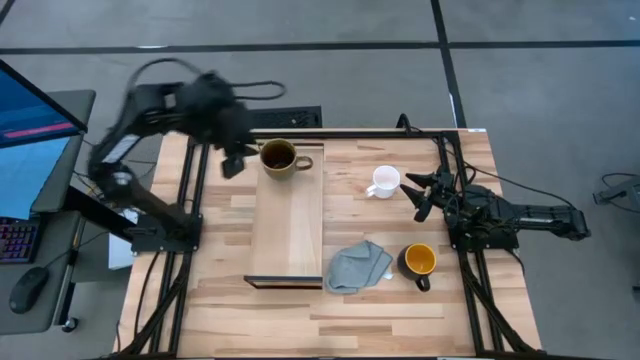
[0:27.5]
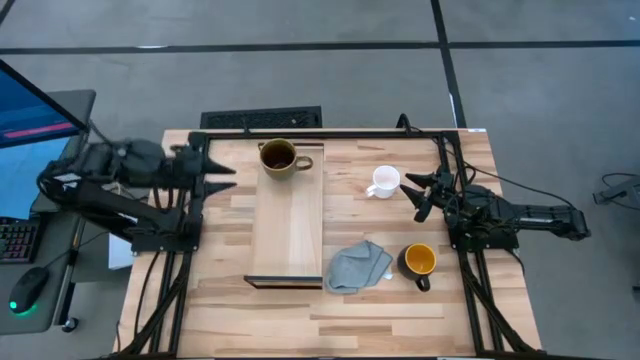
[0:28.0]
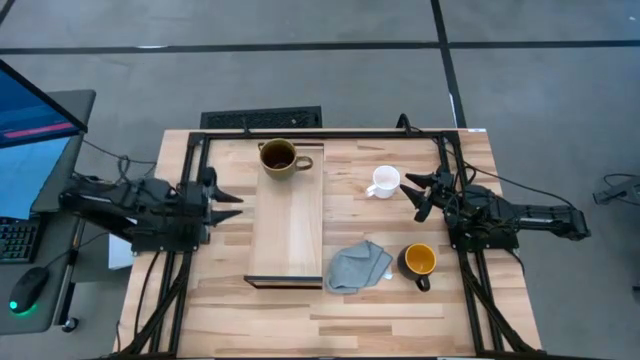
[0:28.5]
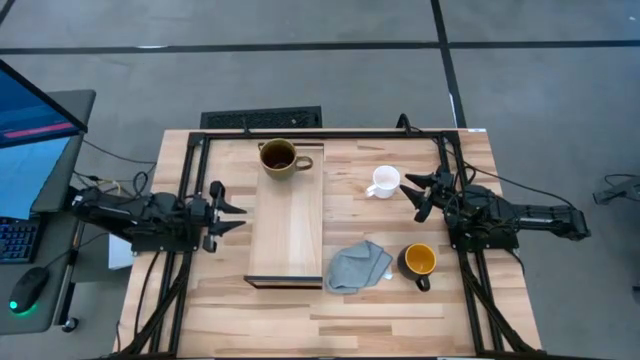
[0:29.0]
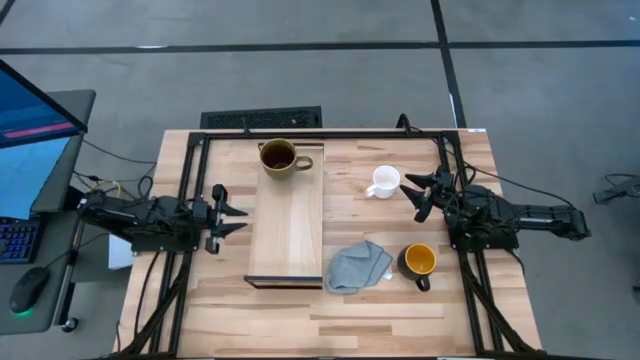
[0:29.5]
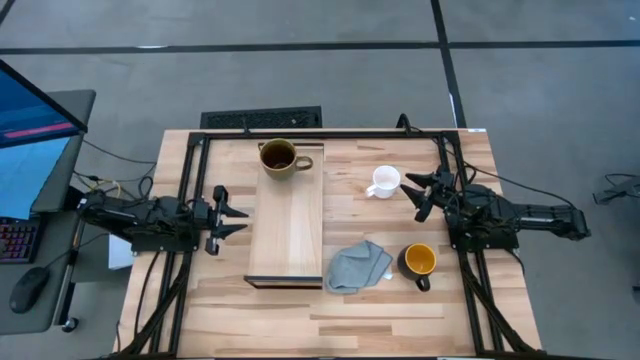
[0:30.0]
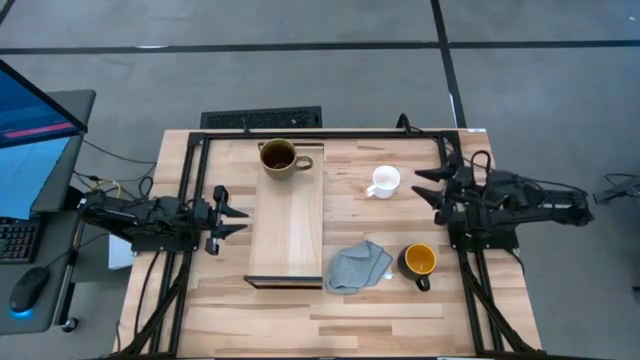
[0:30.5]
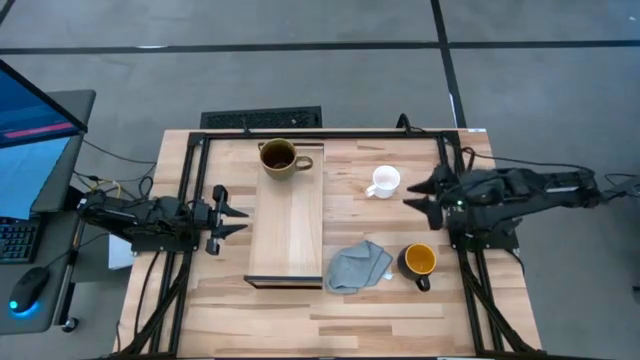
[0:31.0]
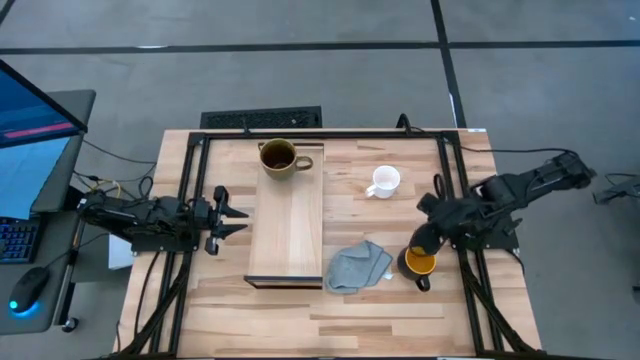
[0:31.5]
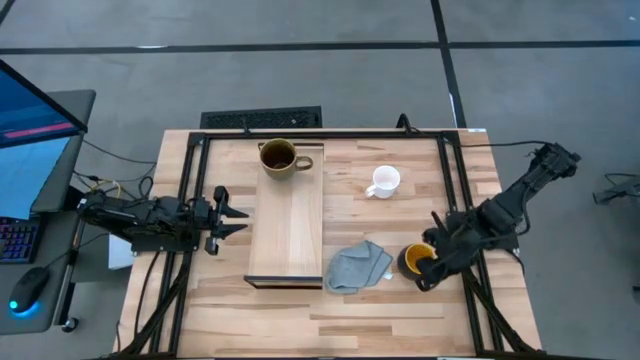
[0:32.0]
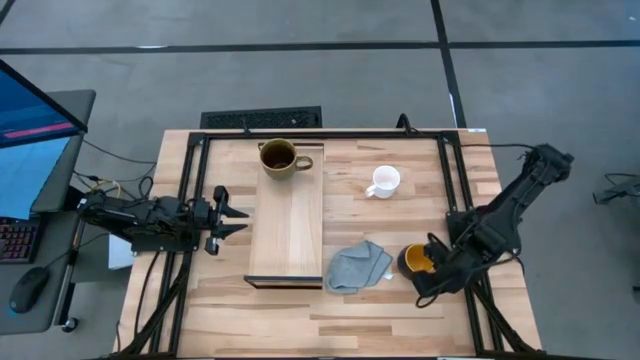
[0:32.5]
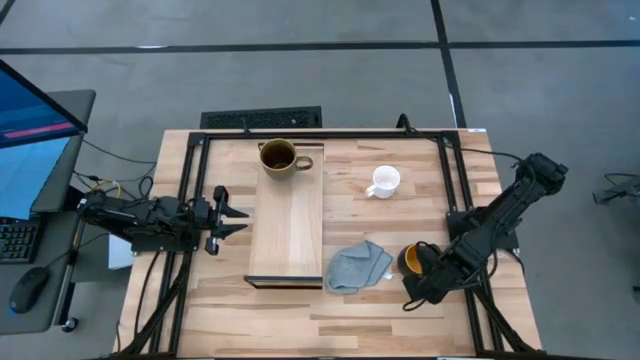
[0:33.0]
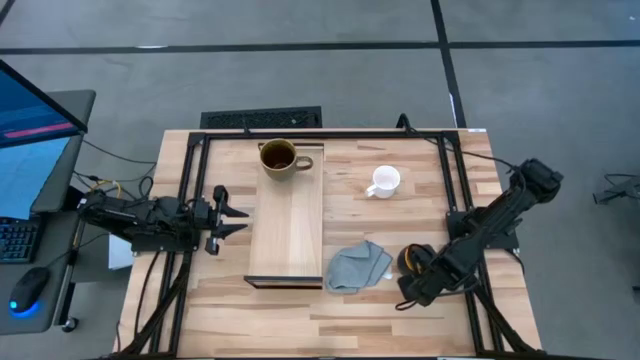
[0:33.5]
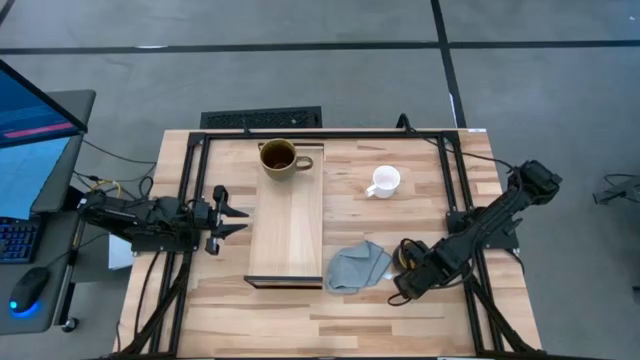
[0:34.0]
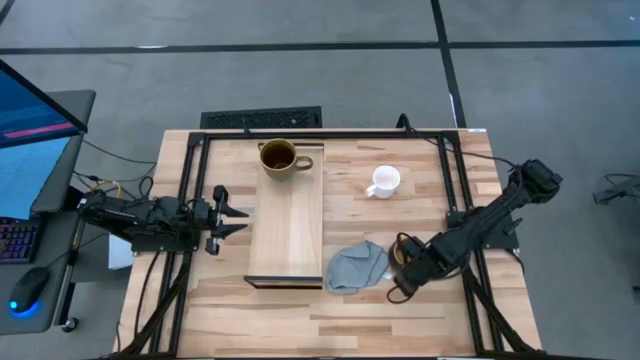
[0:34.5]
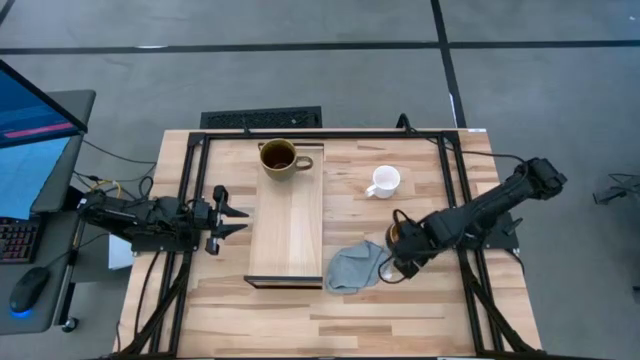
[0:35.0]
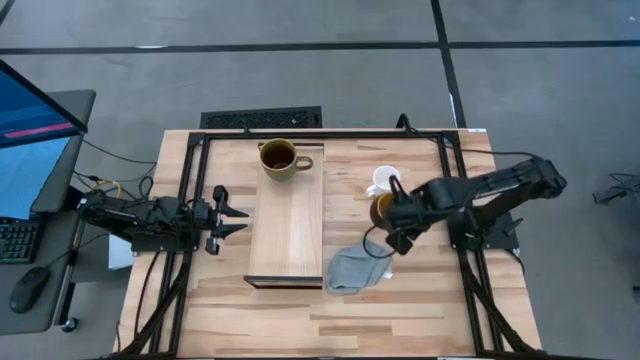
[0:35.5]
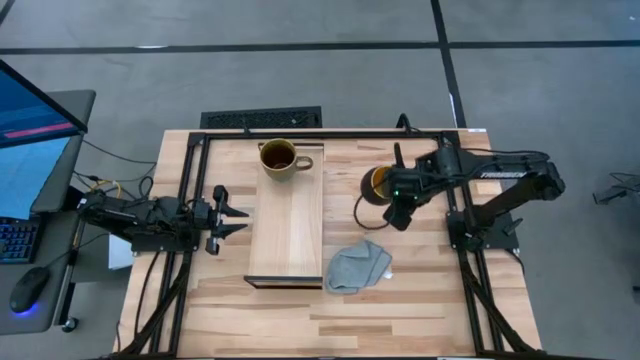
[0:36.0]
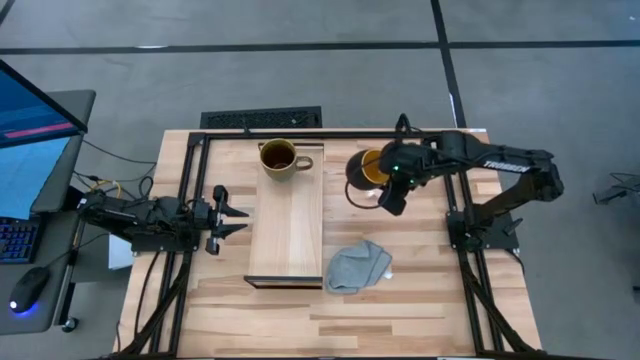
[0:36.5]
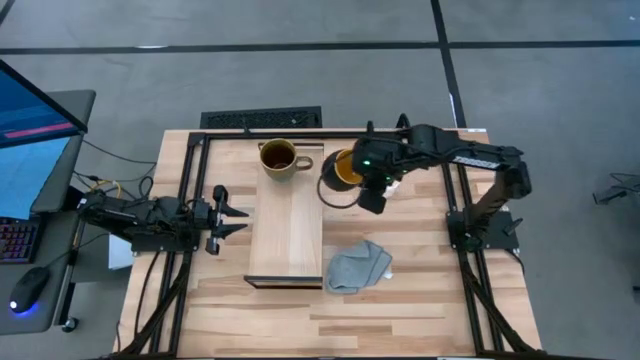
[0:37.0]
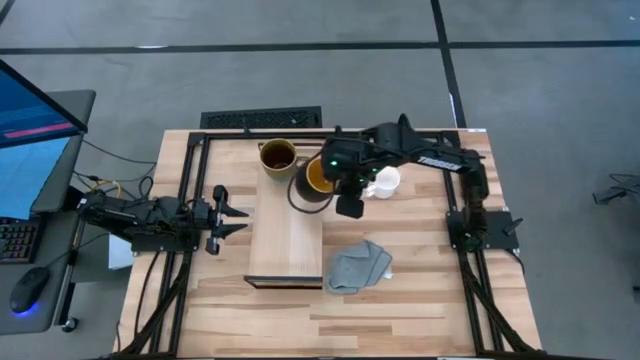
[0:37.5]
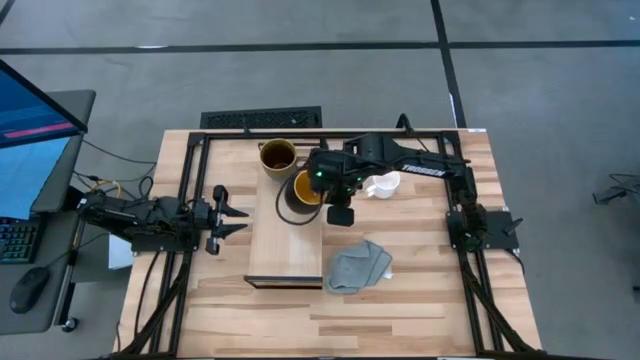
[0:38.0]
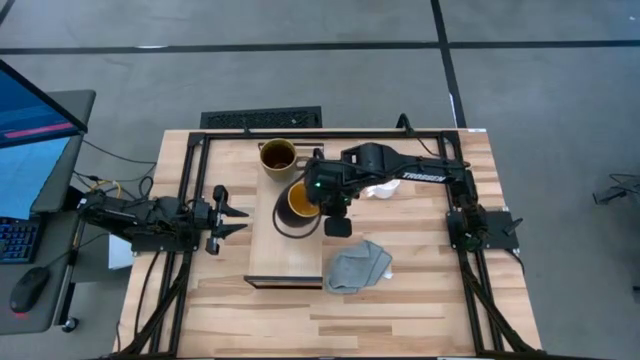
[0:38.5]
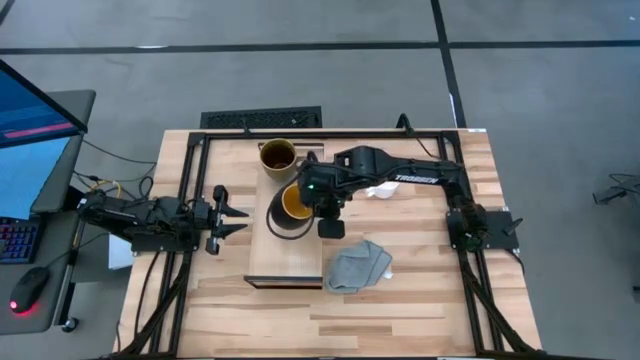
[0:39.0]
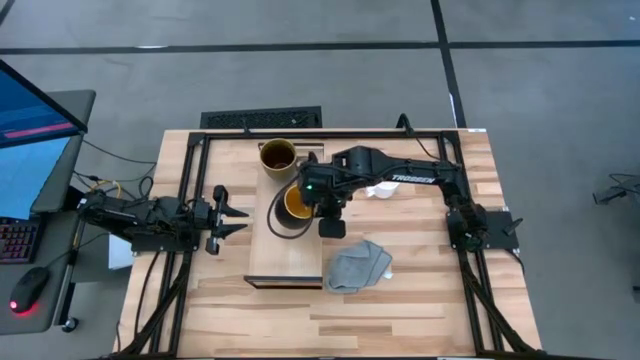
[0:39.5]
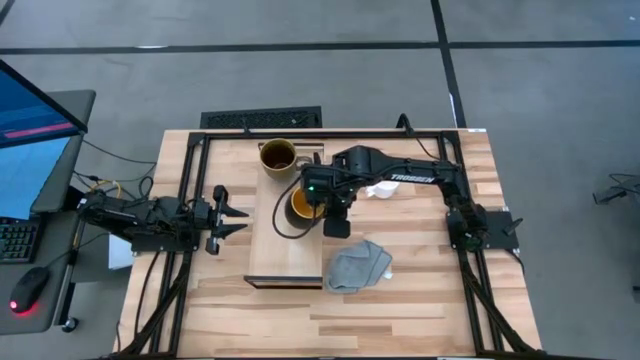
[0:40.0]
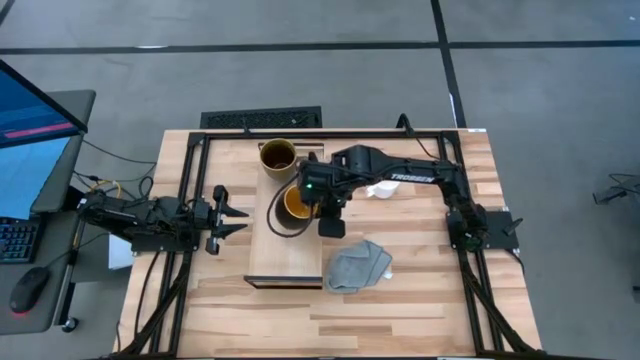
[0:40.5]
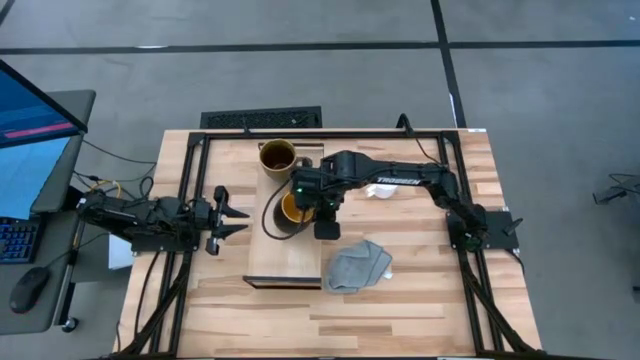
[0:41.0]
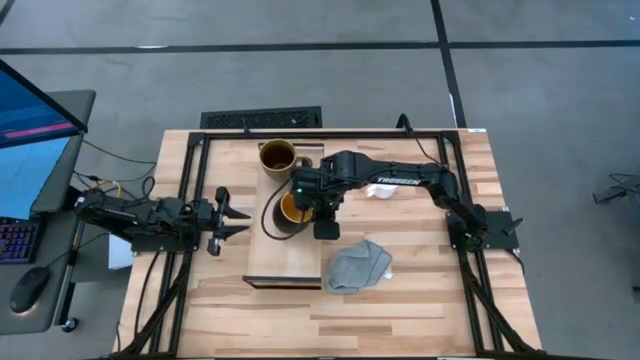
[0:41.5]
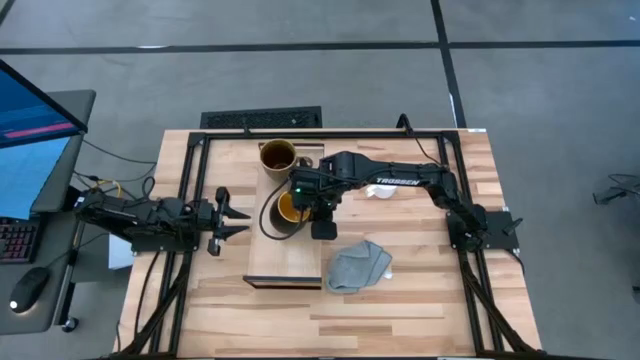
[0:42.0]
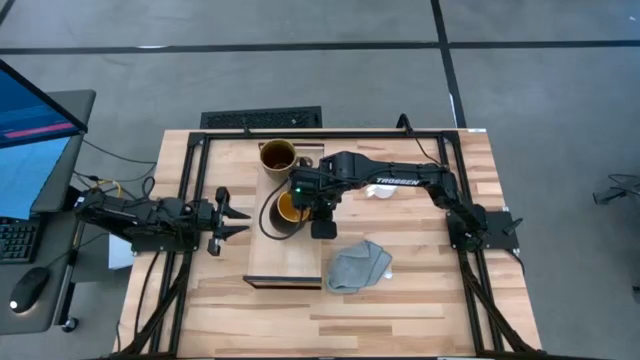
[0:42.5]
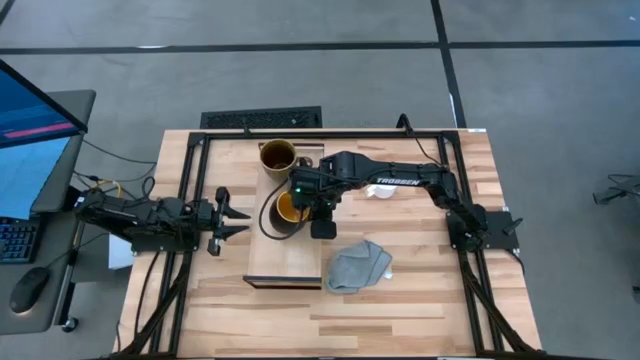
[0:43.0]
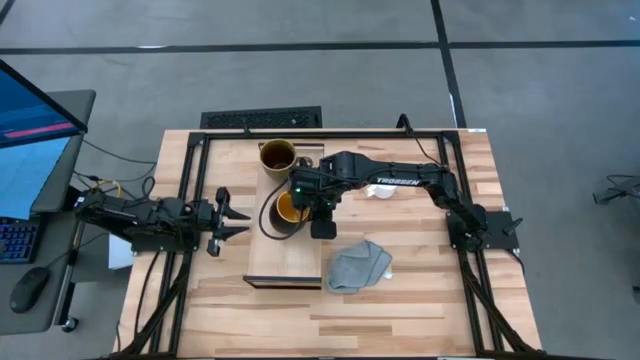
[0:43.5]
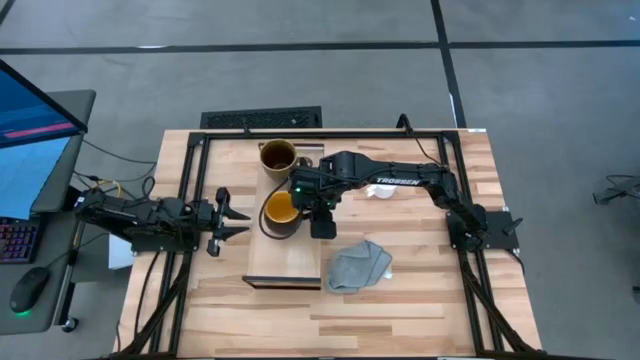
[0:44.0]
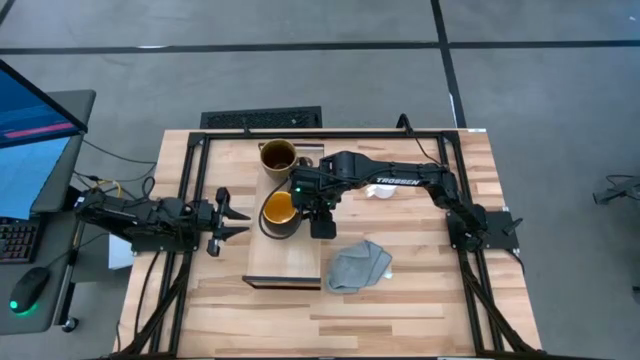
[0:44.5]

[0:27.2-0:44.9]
Task: Stack small to large cups/mugs on shelf
Put the black patterned mug on the shelf
